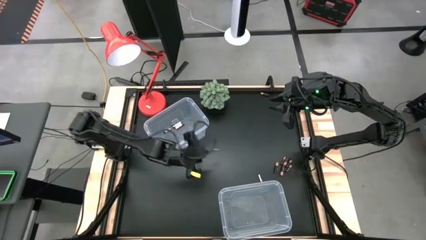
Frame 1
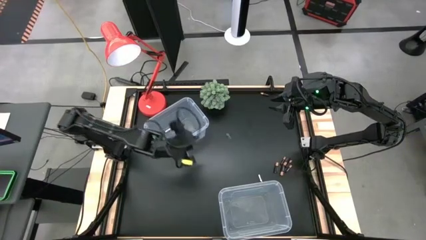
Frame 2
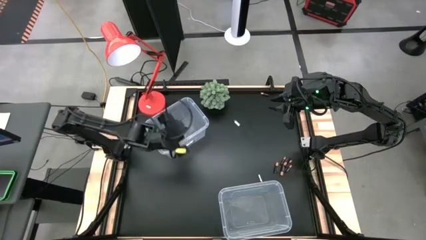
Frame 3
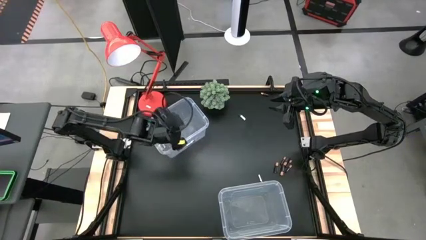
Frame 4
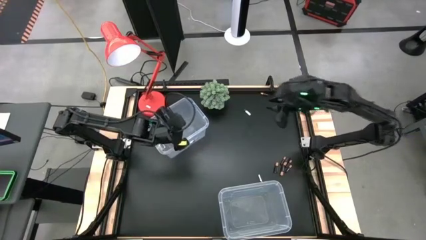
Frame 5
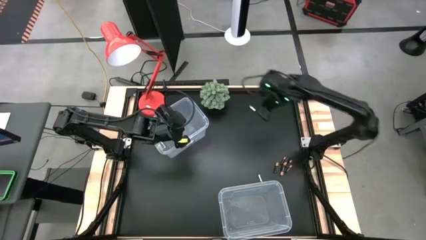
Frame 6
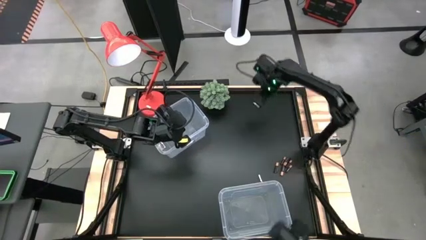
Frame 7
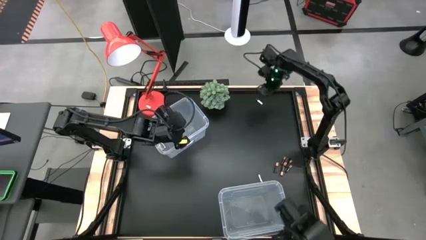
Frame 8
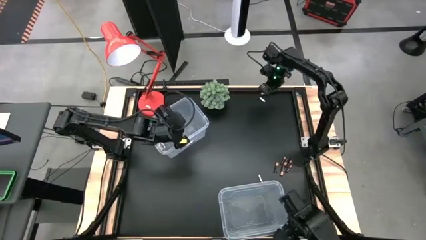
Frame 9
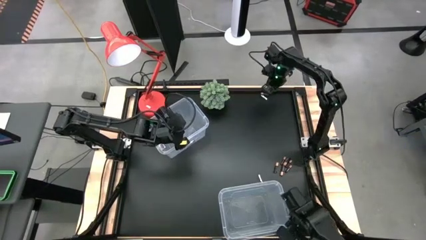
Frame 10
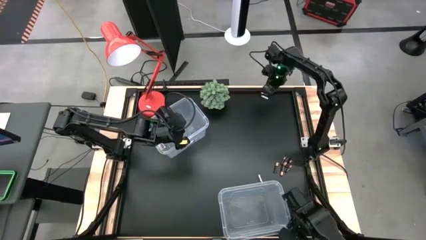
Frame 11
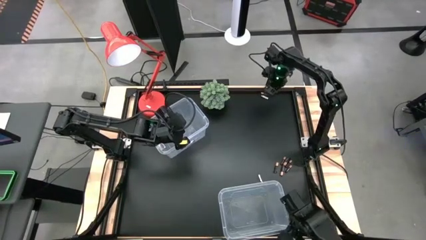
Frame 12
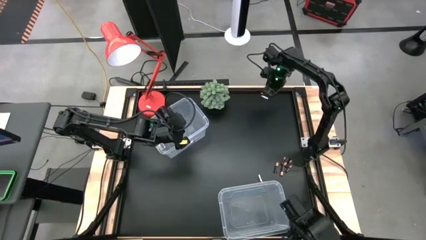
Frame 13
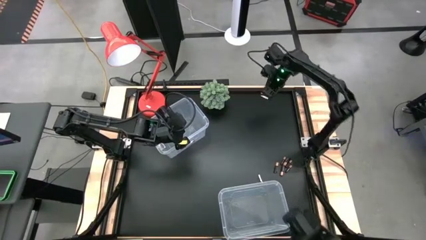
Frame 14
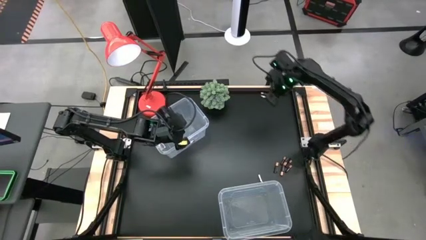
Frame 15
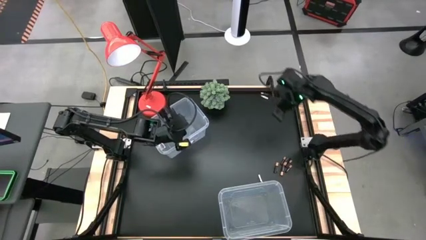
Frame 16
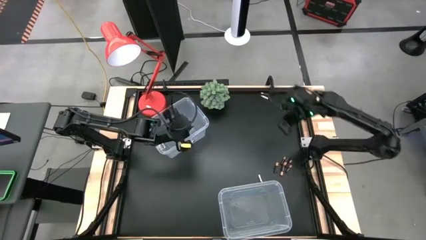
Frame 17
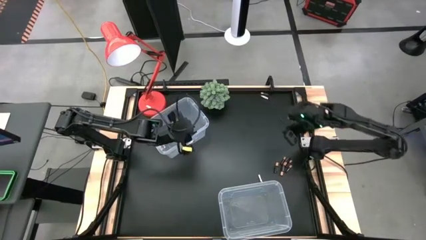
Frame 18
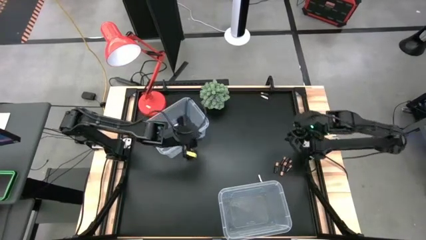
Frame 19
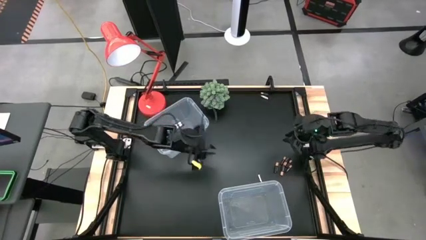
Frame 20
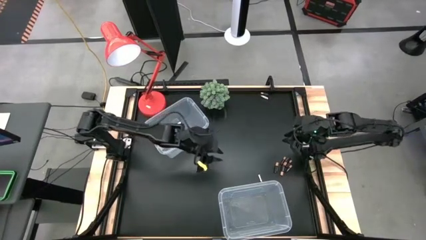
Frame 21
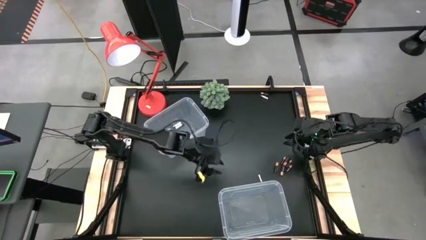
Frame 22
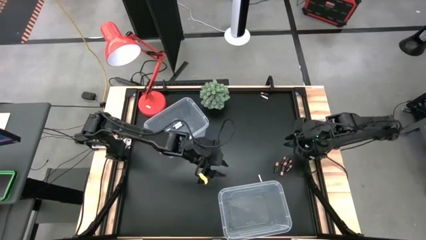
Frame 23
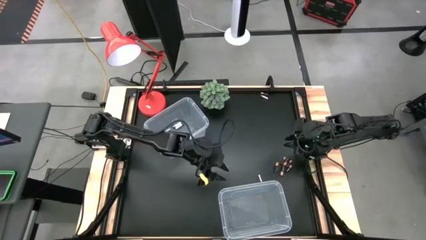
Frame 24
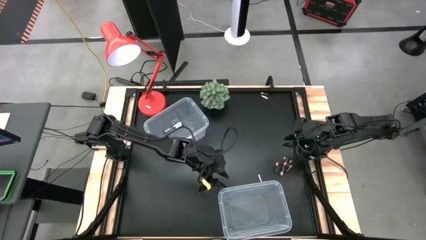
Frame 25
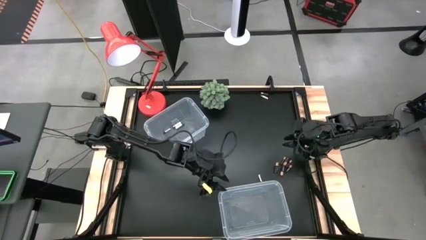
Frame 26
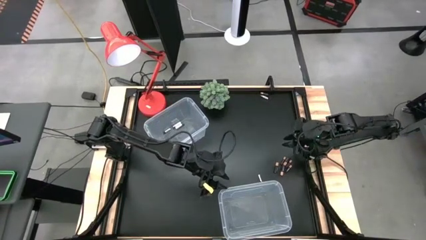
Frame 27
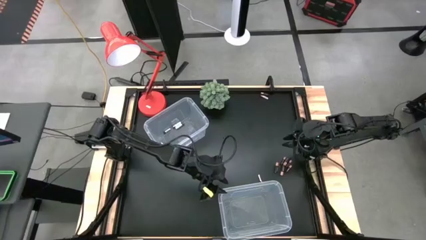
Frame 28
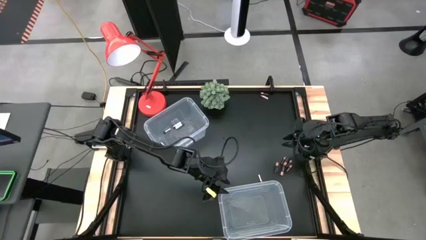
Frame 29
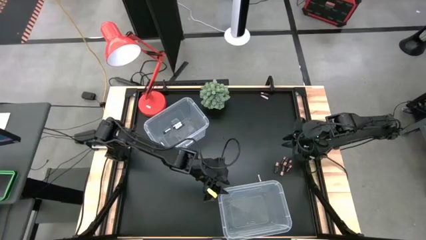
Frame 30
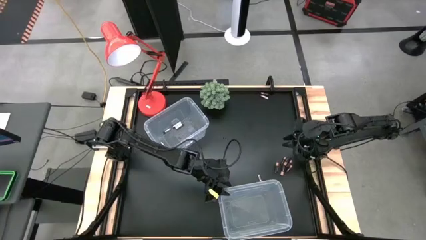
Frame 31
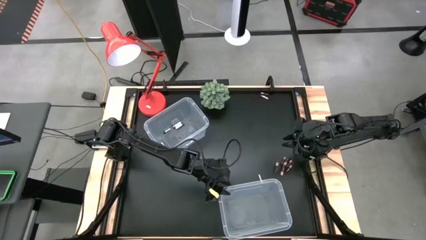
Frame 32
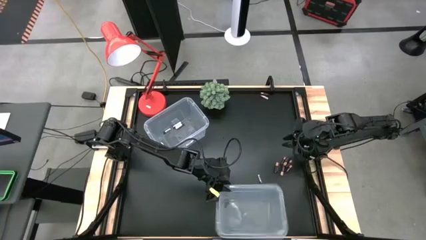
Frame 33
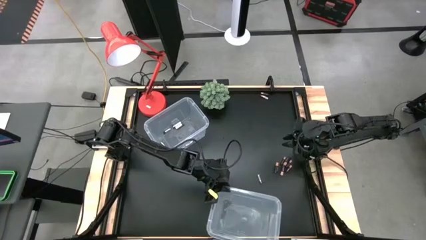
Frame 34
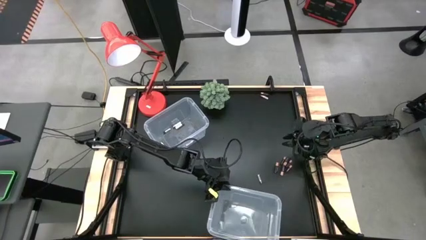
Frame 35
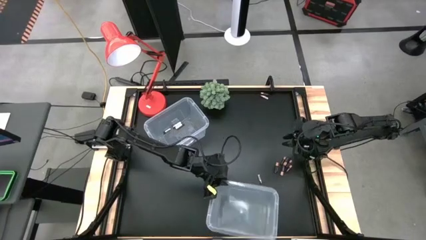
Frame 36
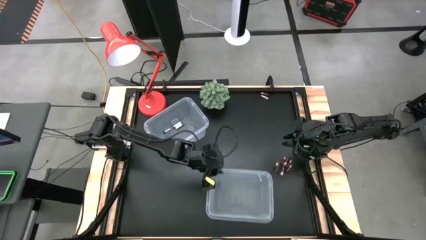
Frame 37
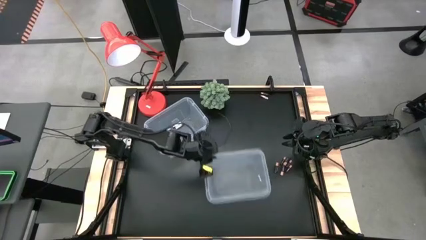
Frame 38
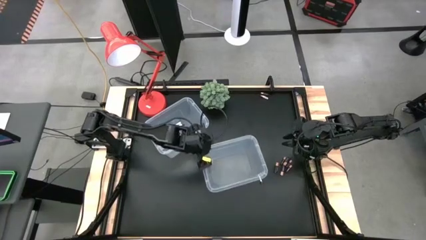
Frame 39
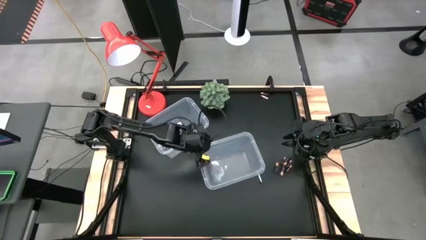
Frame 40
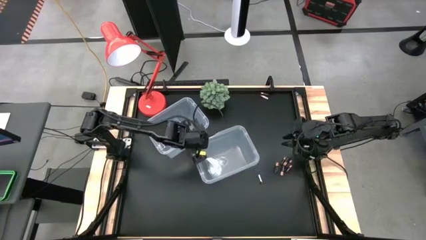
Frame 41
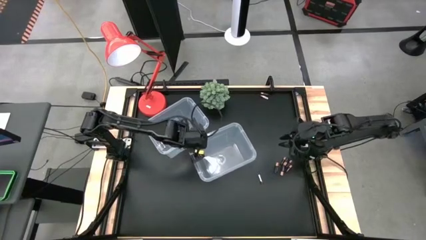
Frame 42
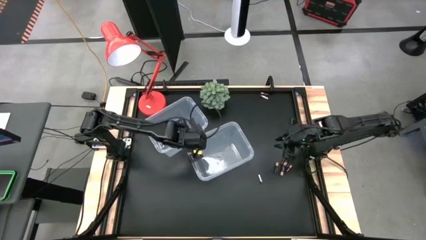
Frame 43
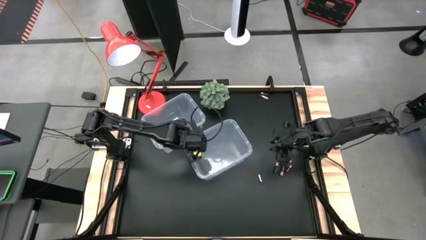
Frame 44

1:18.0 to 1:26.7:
Task: Sort batteries
Move the bottom transparent bin to the center

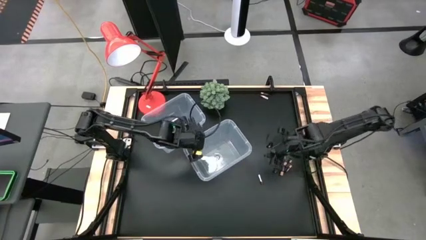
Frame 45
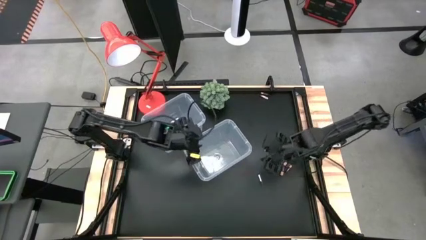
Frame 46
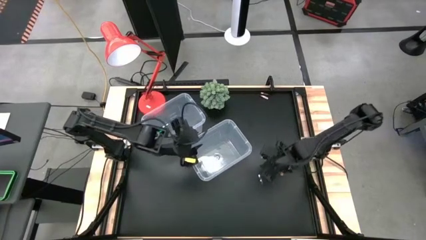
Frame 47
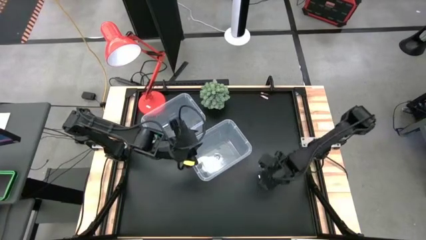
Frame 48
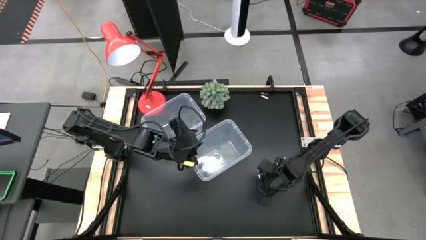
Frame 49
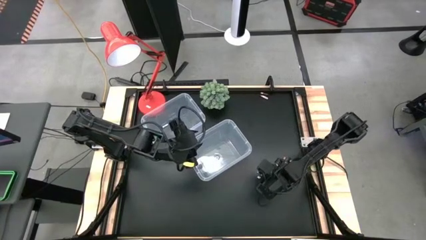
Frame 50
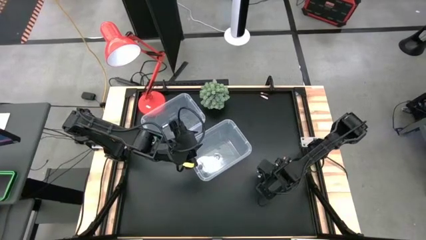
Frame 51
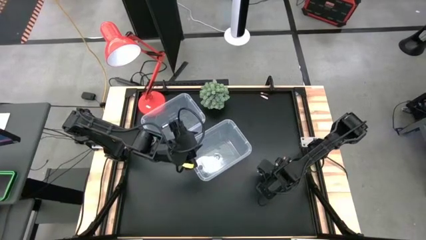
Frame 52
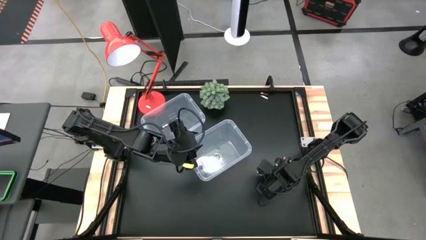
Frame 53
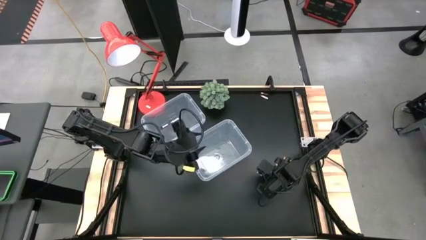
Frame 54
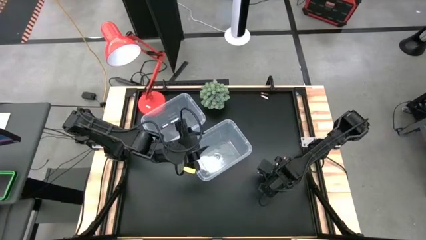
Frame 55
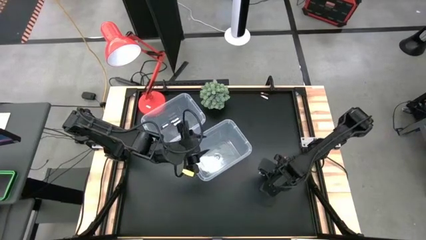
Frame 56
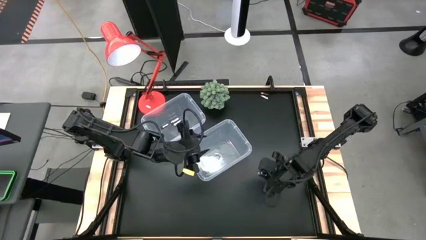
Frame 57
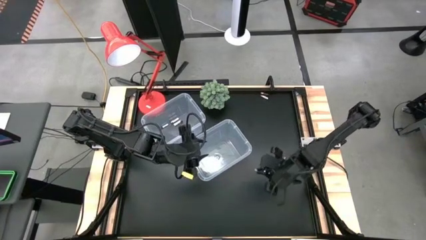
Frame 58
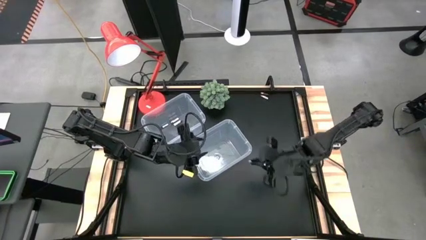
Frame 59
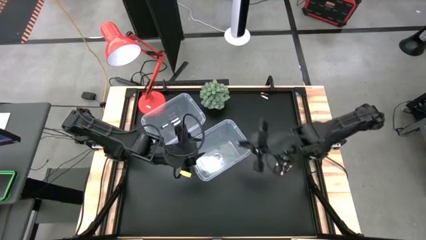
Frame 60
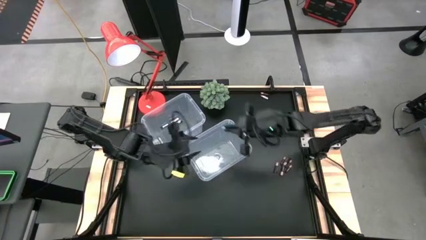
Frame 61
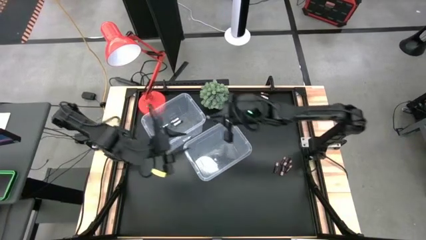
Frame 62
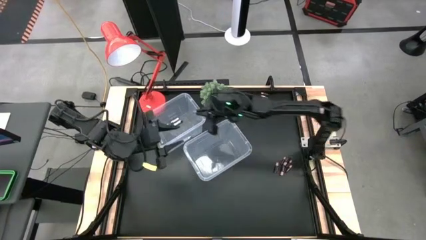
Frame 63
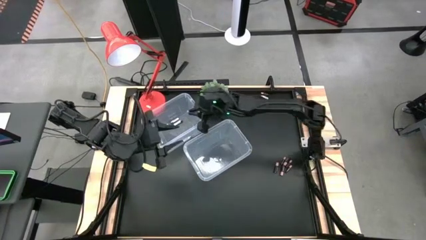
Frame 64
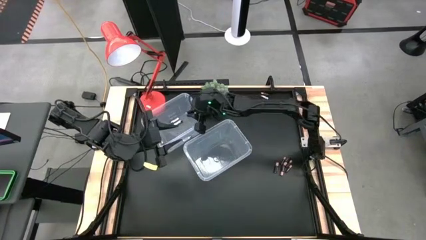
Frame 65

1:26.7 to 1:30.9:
Put the silver battery into the top transparent bin

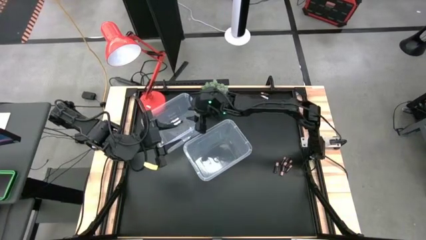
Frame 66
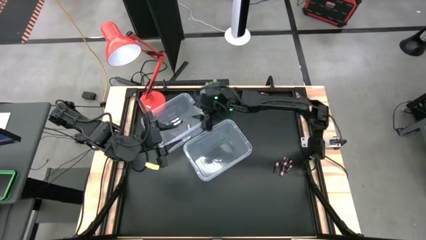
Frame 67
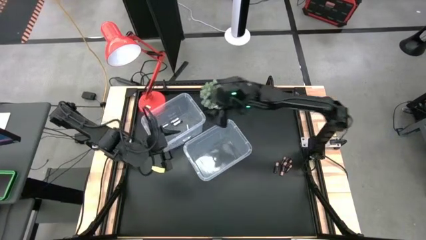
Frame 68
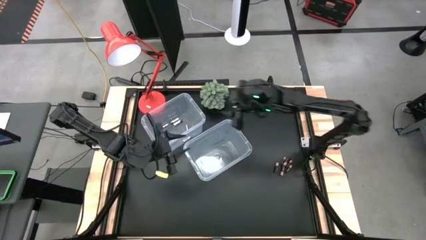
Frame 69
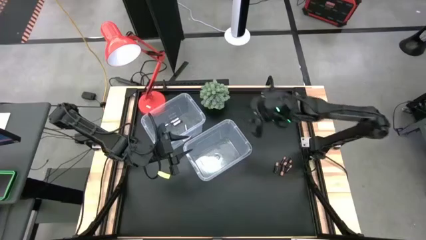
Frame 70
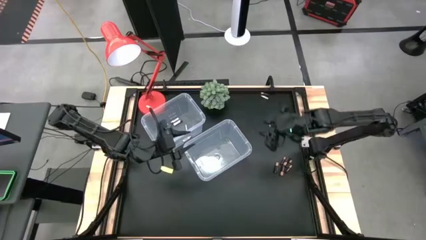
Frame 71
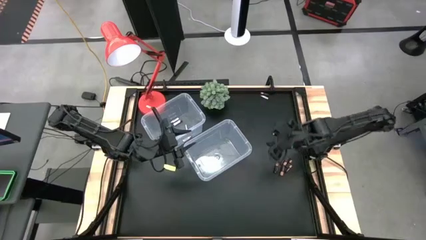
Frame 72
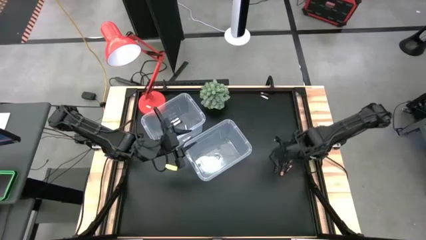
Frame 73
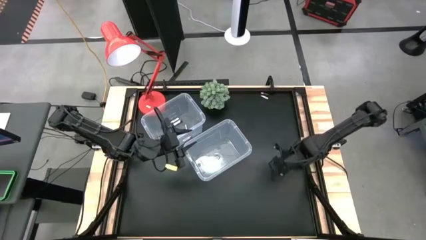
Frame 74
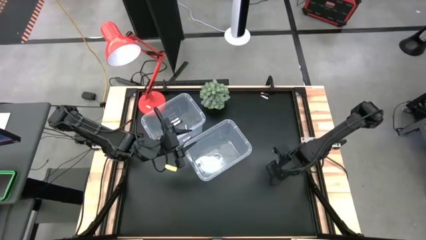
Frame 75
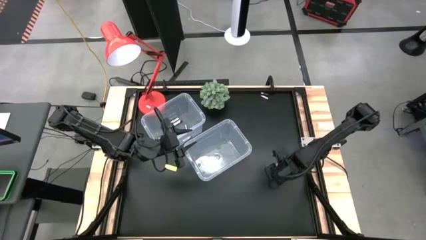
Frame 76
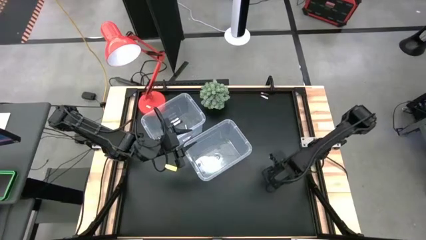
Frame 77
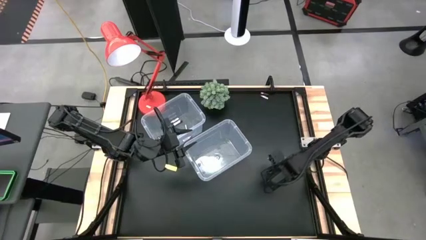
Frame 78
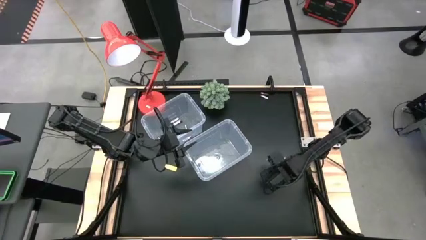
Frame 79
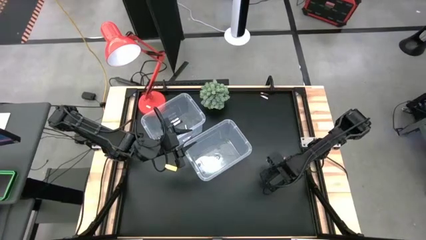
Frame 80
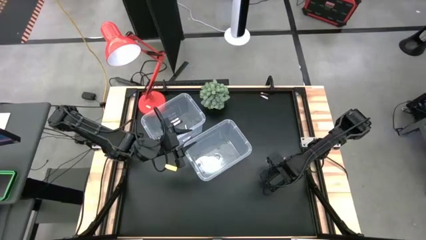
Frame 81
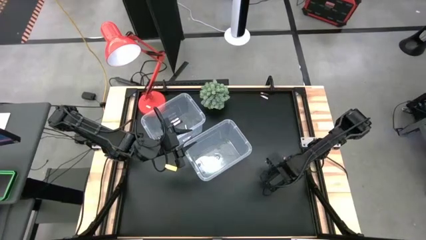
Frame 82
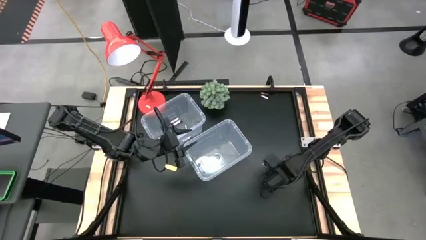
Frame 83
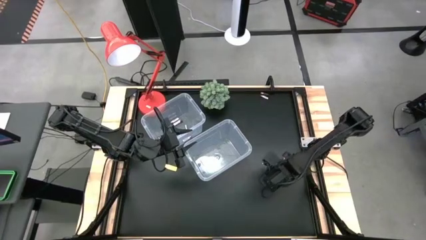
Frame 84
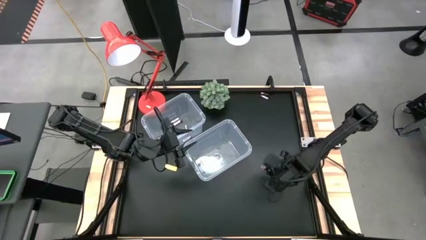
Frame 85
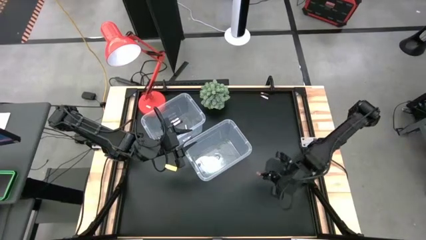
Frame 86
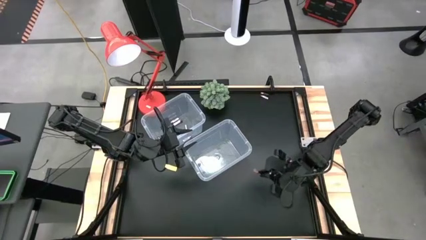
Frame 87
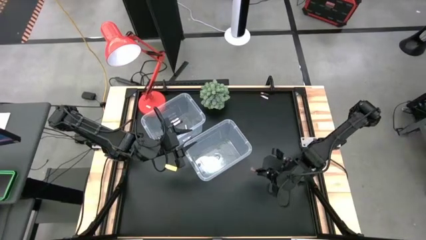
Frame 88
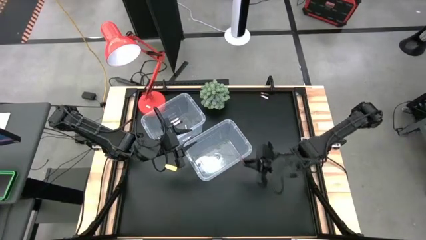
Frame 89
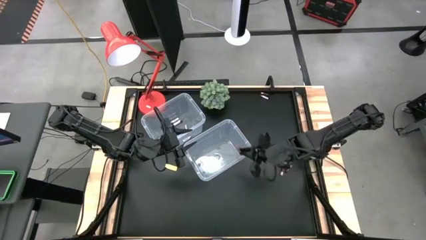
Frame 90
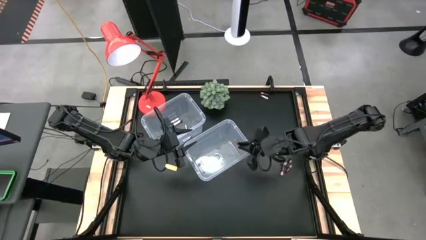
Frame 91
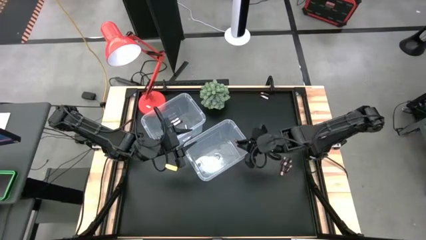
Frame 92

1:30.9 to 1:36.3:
Put the brown battery into the bottom transparent bin
